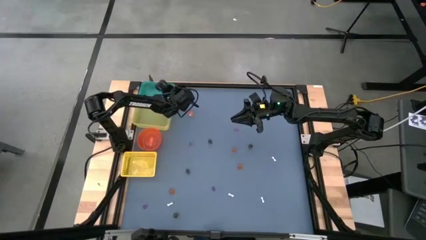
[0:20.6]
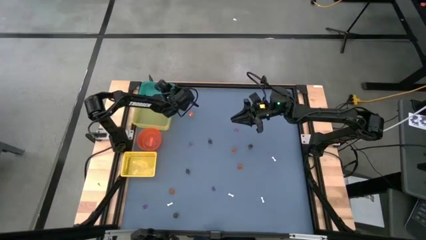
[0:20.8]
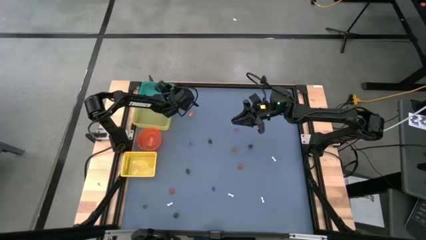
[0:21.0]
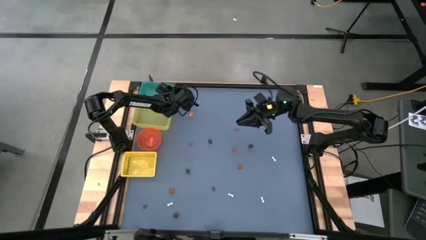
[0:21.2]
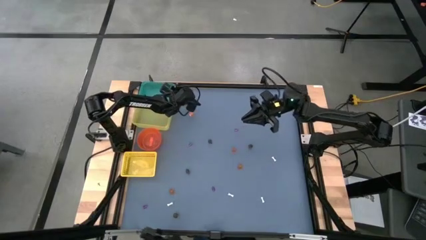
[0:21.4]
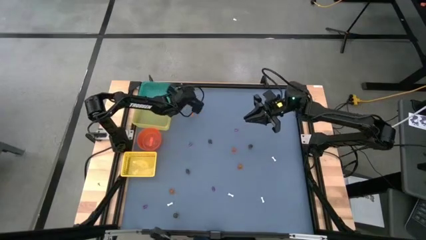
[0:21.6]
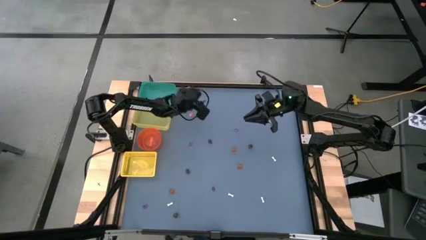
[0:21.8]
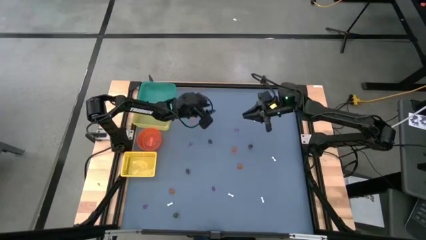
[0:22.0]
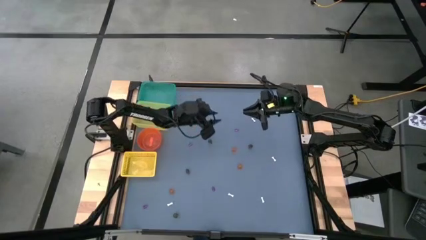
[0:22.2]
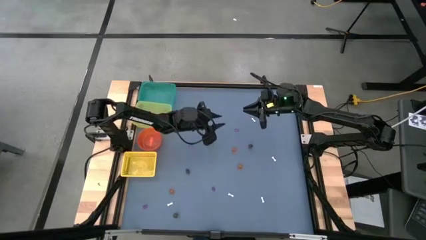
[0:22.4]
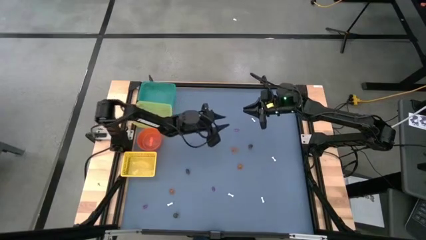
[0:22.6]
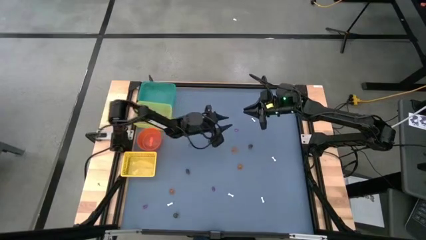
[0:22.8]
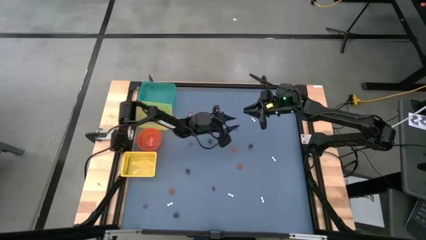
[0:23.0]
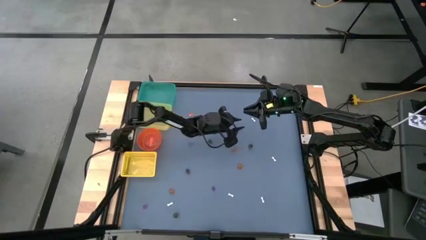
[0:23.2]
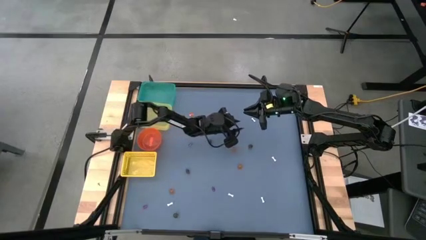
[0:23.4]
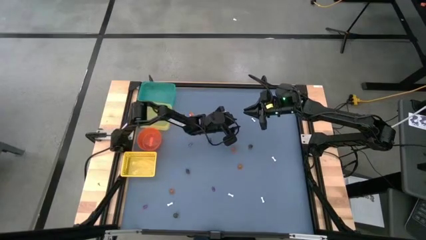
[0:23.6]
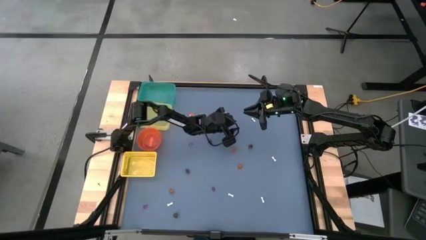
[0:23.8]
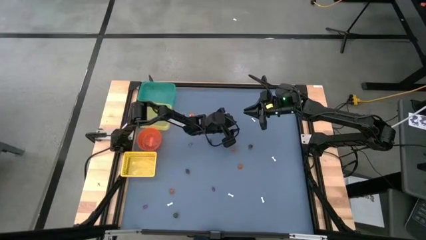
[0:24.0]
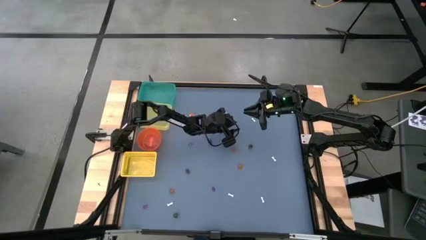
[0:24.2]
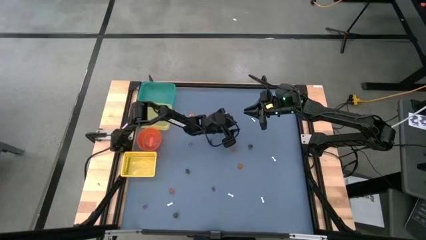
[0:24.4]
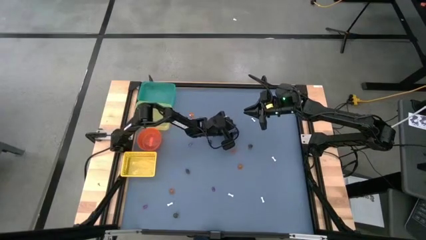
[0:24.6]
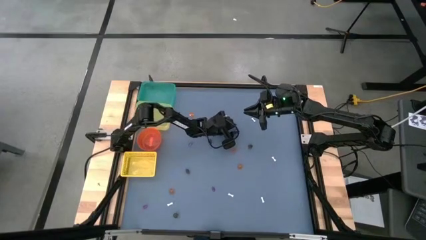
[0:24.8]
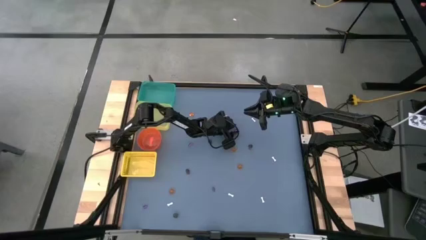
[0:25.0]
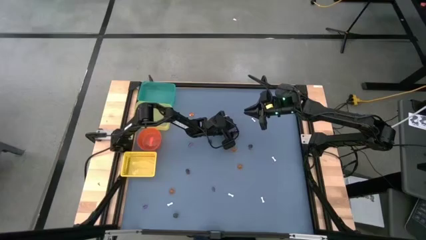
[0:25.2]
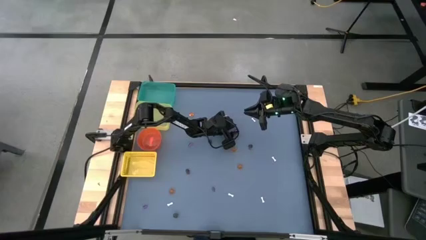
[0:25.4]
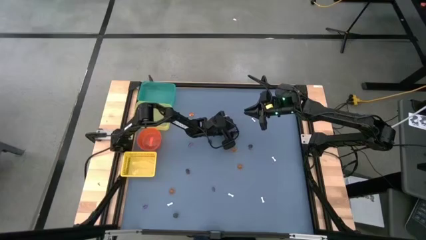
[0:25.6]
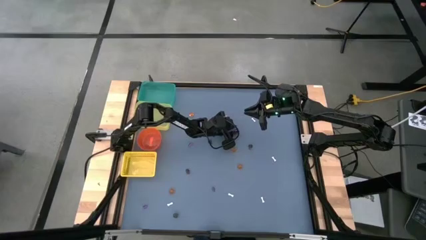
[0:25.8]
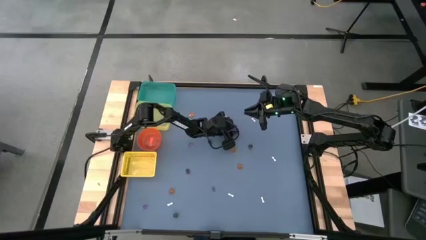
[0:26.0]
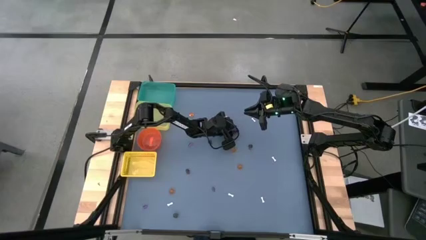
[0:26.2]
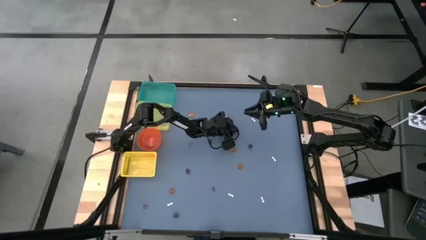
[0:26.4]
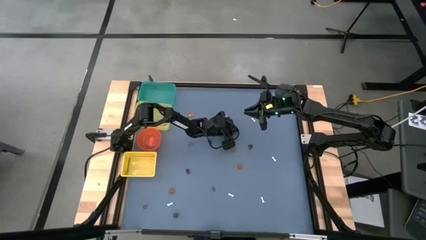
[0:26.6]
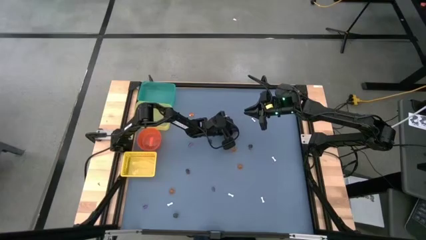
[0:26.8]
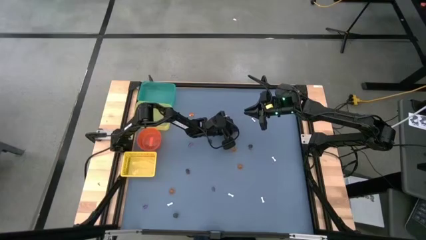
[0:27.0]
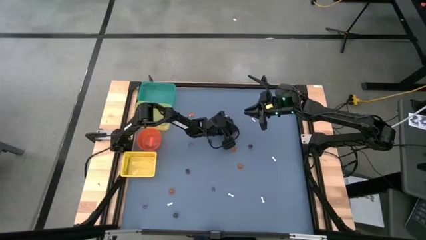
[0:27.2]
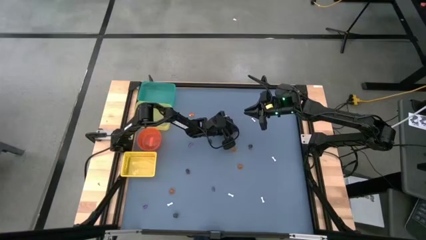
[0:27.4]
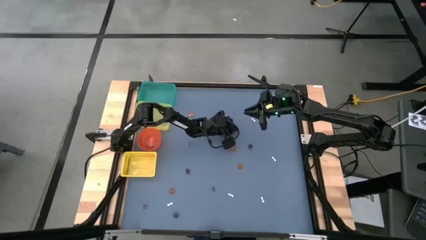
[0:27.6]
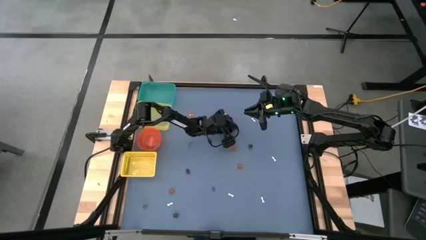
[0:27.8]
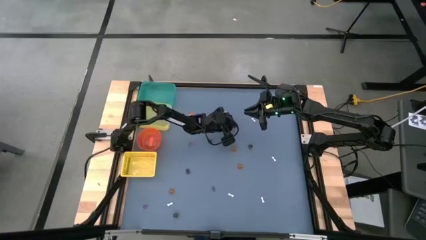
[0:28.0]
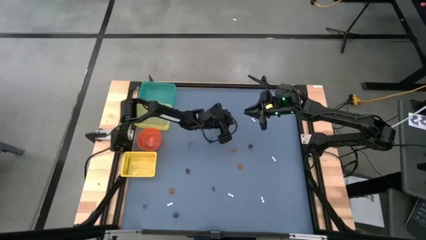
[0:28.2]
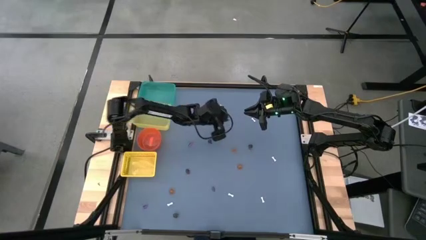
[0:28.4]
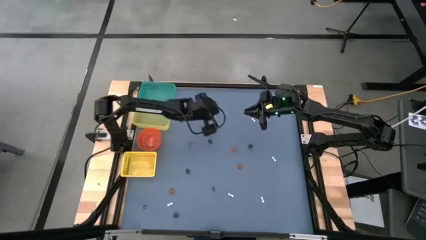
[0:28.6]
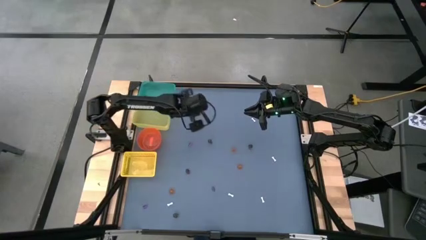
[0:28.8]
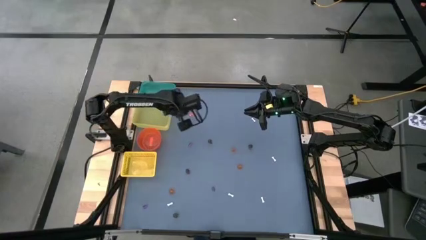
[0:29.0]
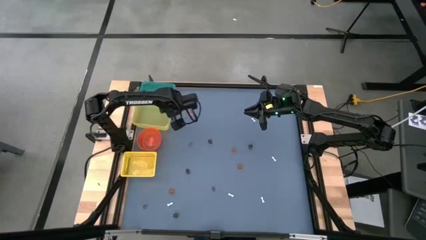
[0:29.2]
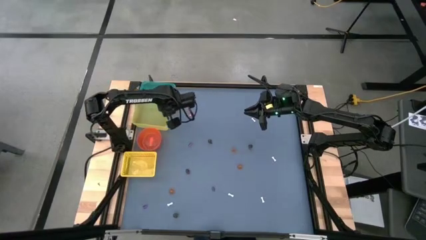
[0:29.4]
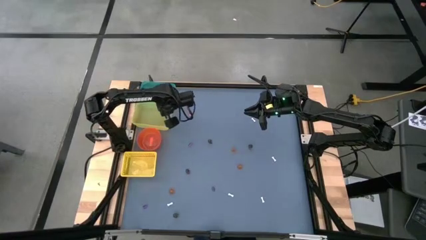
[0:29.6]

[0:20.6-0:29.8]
Task: Sort Halloween decoration
Put the top right purple witch hat toy into the yellow bin

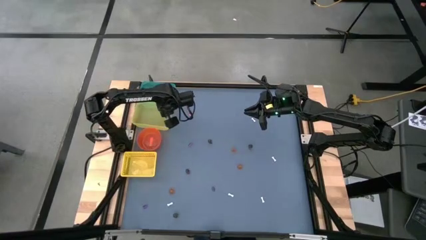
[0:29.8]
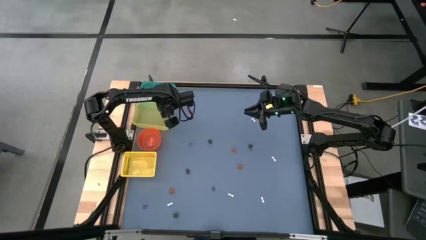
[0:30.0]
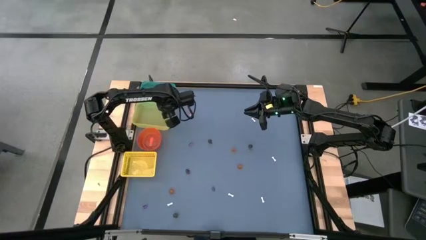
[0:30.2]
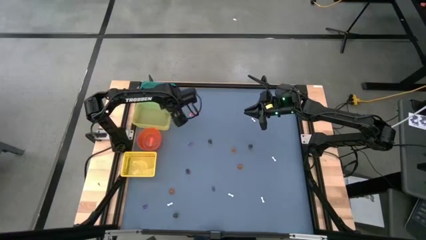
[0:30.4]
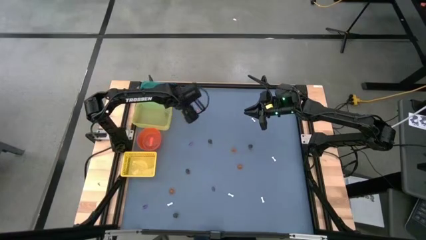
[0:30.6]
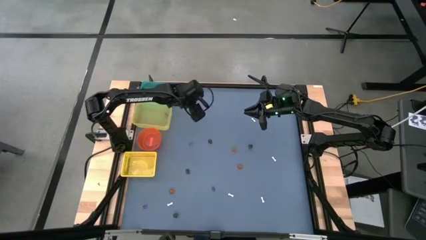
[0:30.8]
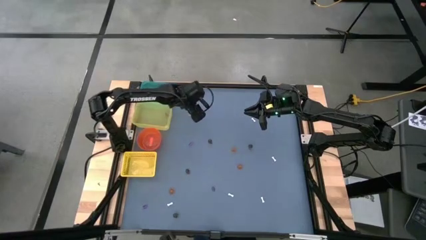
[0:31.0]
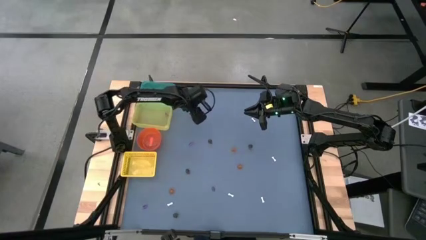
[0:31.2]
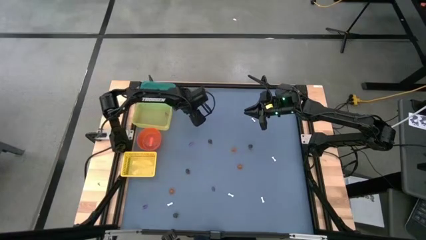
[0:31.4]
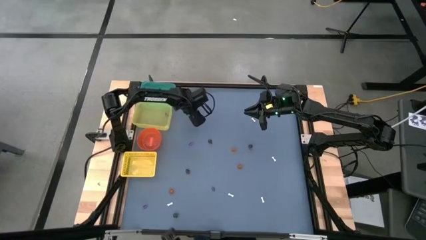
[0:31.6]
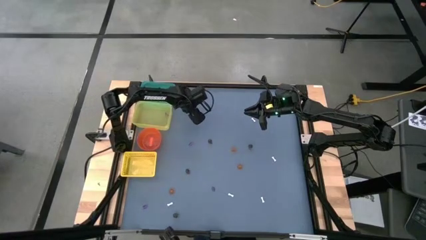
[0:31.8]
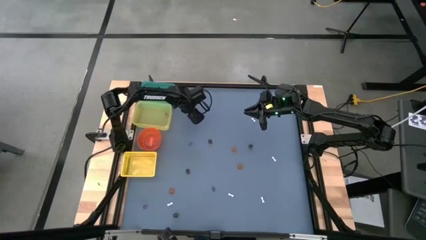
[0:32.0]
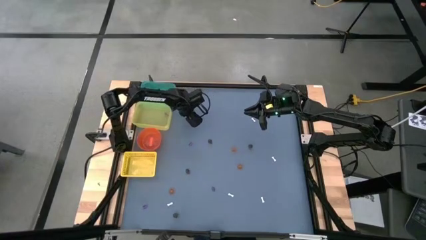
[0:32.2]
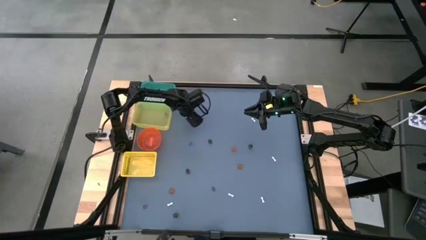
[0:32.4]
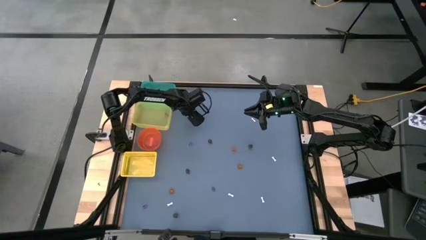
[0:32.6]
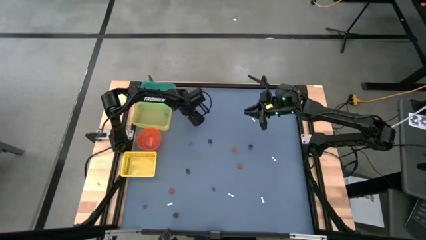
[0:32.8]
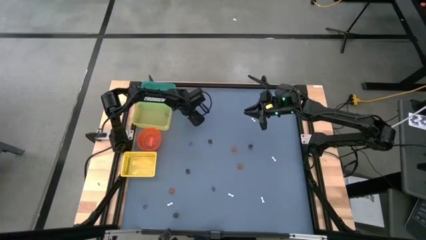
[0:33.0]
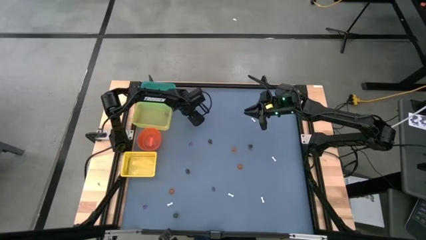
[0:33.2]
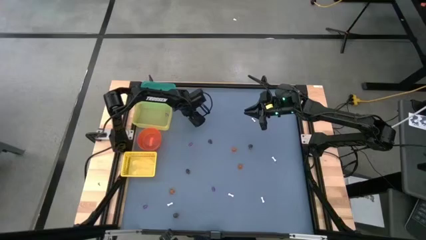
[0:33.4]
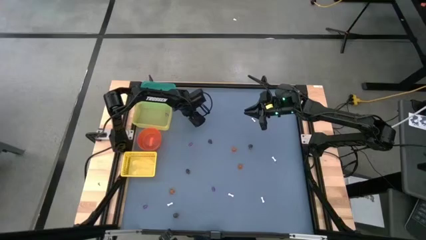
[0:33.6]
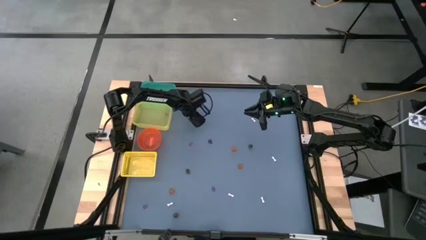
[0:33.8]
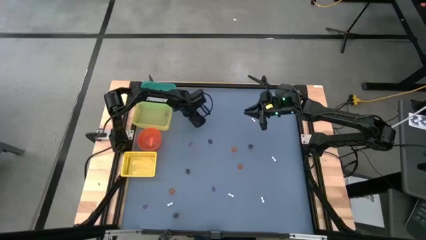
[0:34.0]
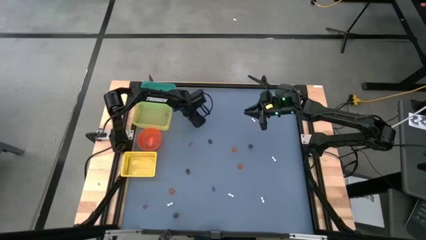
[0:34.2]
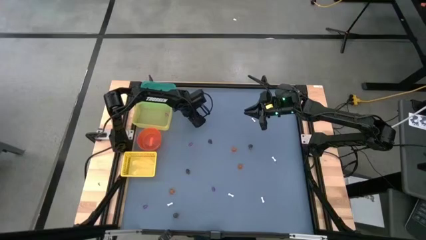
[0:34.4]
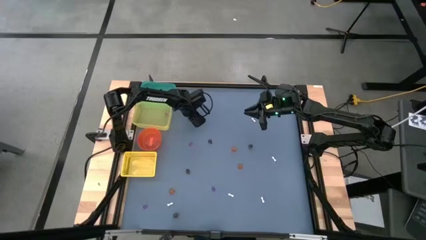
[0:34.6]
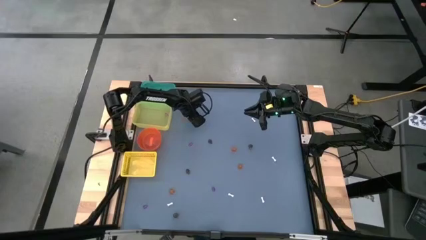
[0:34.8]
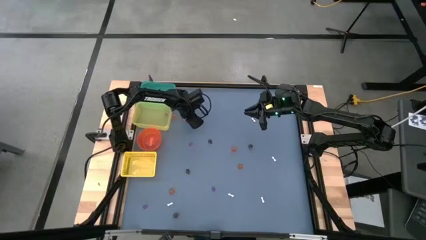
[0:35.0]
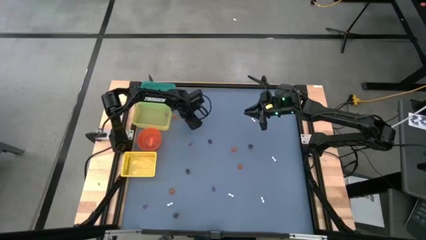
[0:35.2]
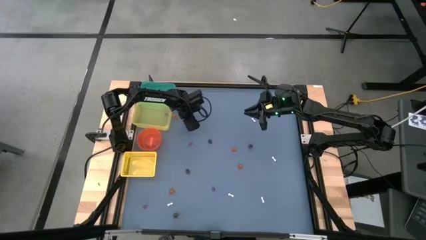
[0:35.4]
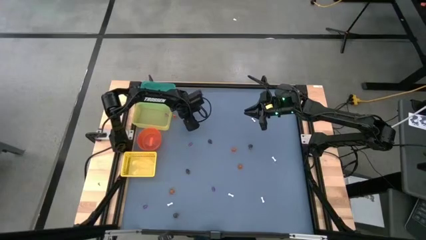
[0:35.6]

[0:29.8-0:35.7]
Put the top left orange pumpkin toy into the orange bin

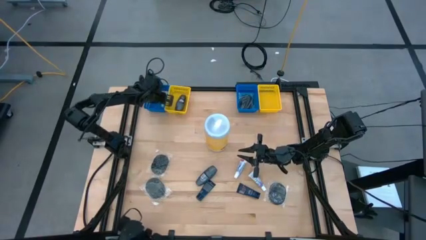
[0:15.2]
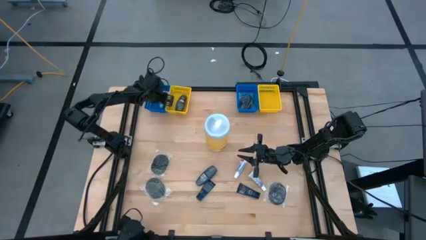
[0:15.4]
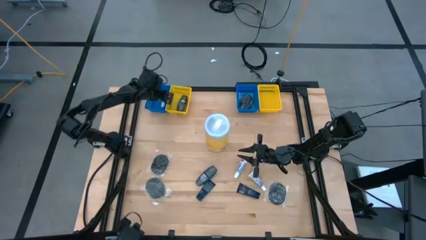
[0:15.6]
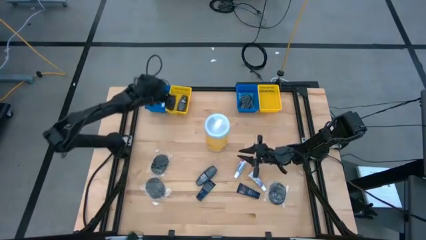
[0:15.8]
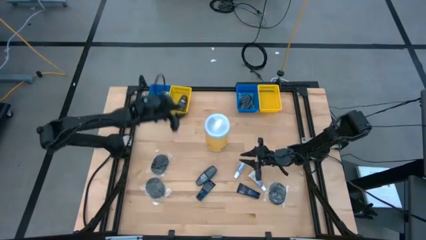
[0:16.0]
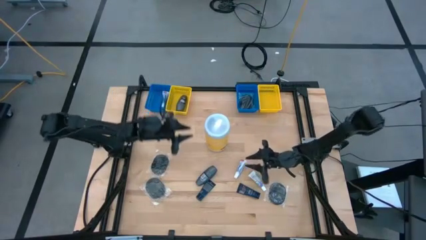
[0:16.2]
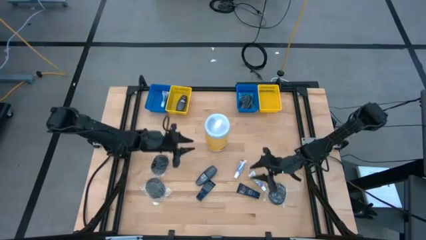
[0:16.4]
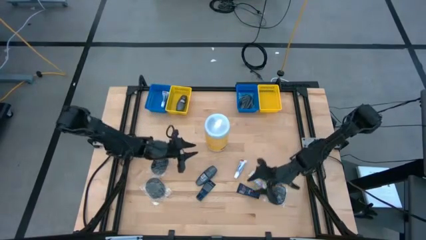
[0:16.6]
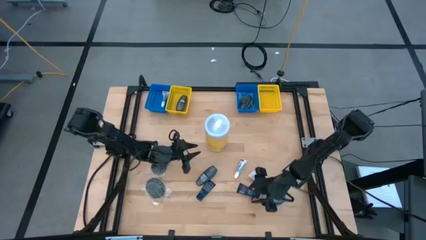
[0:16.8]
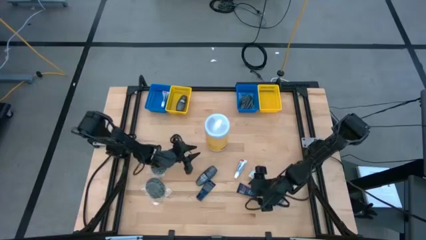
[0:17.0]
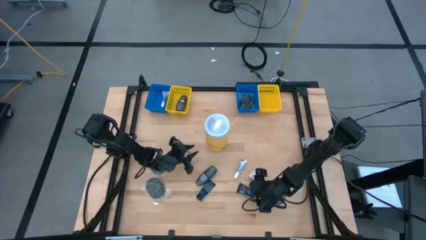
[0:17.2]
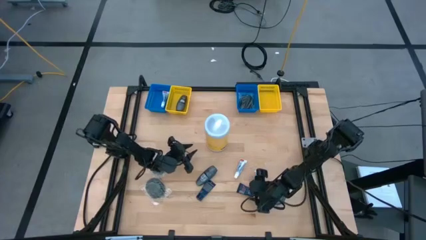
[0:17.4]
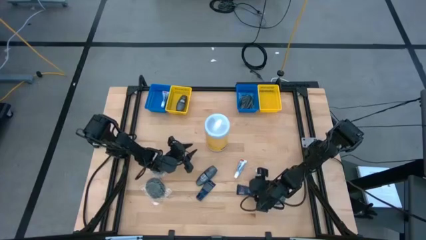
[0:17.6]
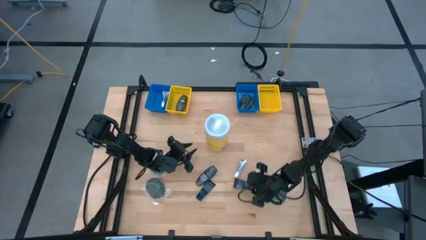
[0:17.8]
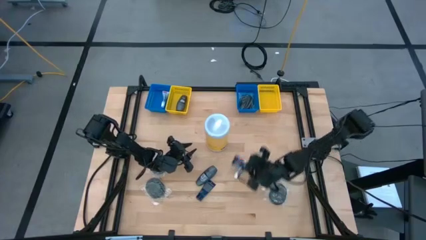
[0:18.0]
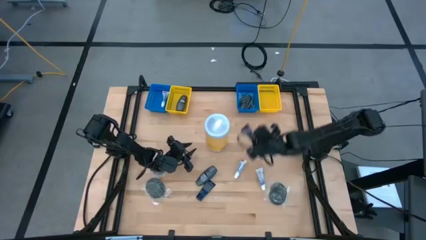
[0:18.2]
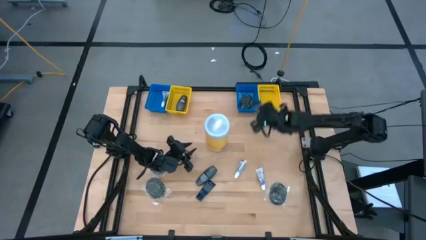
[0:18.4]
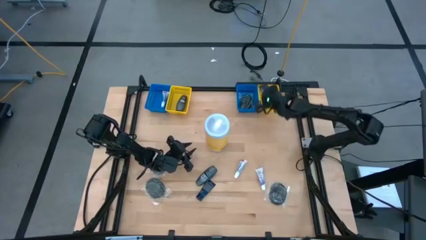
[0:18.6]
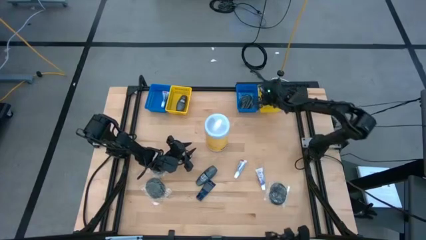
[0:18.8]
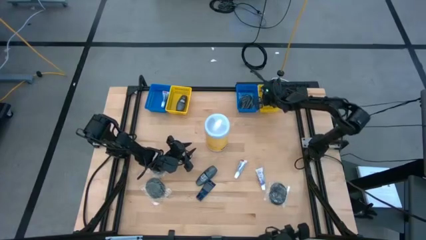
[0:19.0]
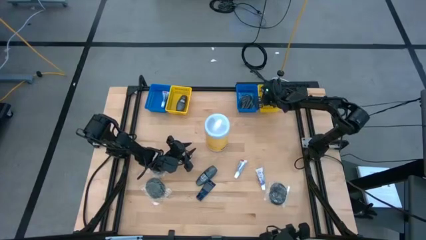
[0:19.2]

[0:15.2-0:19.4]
Task: Pick & Place Travel size toiletries
Put the right shave cream into the right yellow bin
